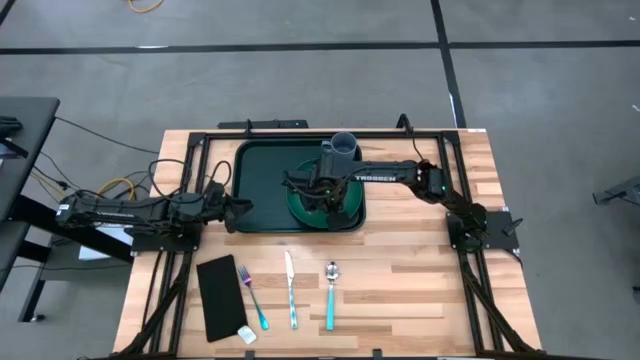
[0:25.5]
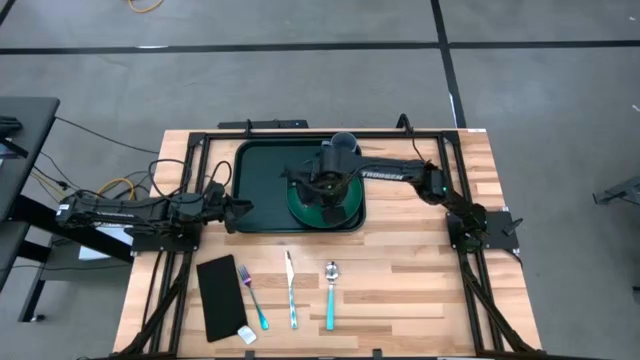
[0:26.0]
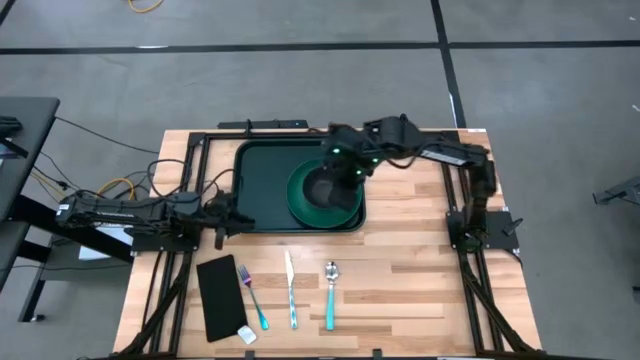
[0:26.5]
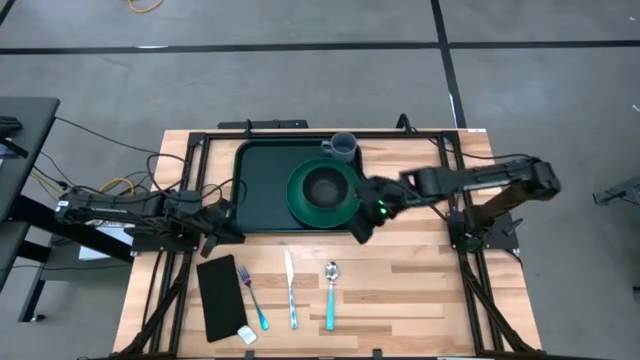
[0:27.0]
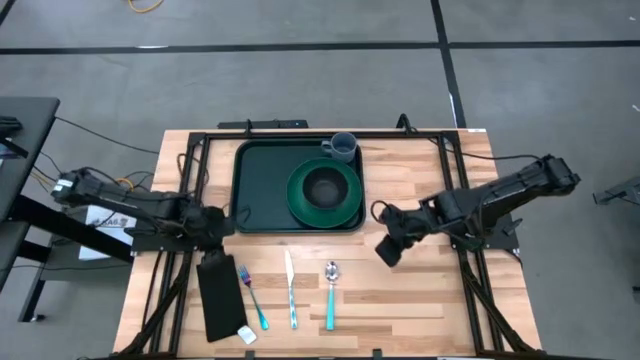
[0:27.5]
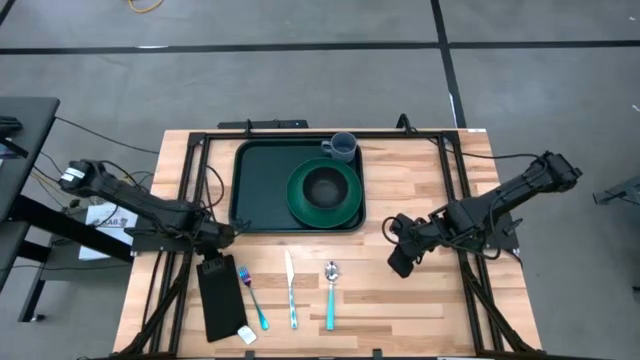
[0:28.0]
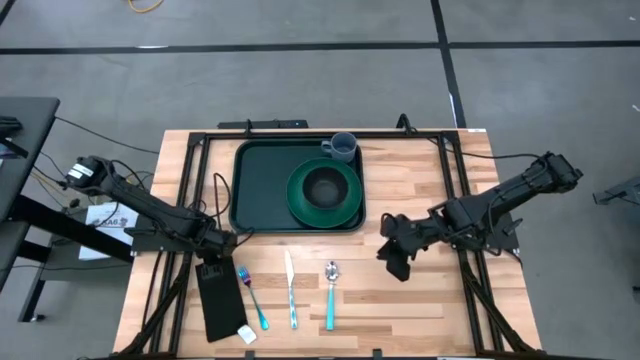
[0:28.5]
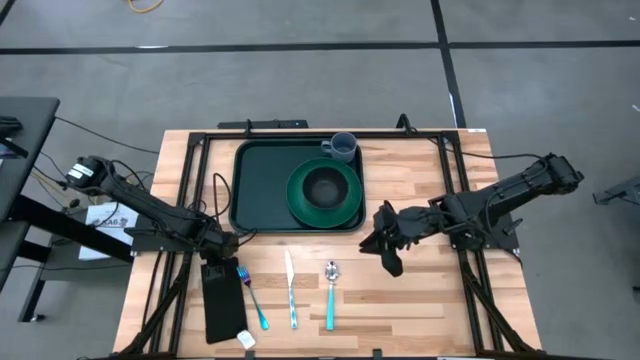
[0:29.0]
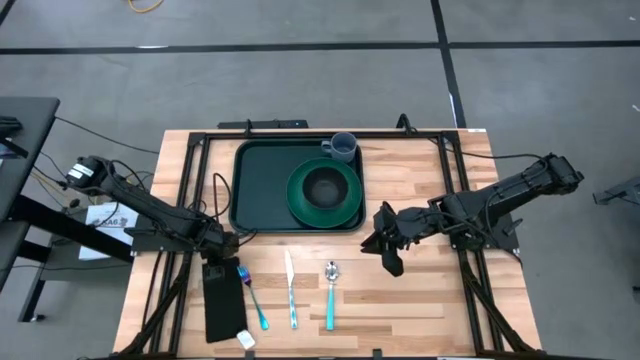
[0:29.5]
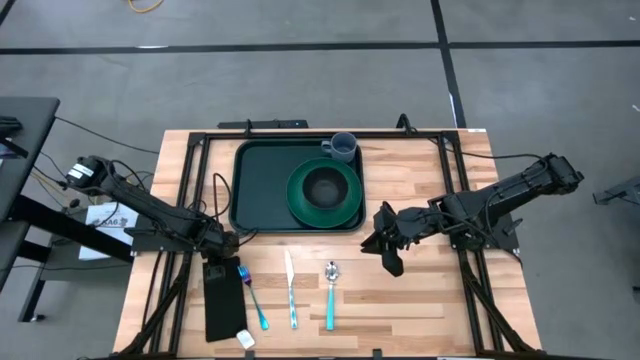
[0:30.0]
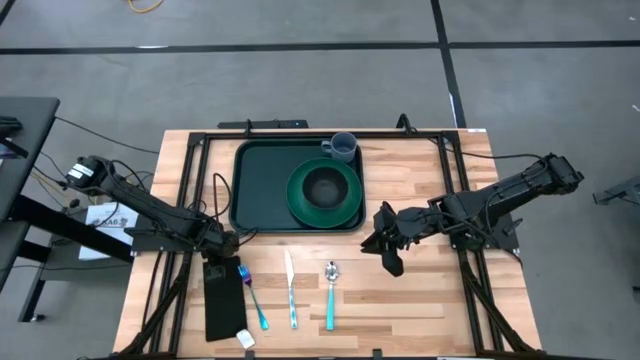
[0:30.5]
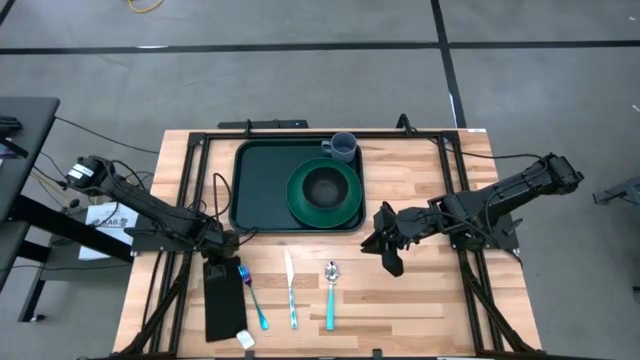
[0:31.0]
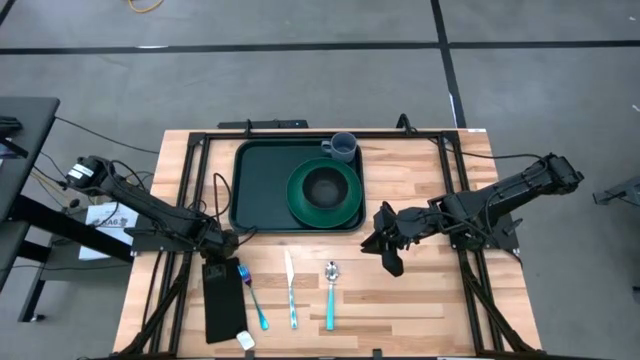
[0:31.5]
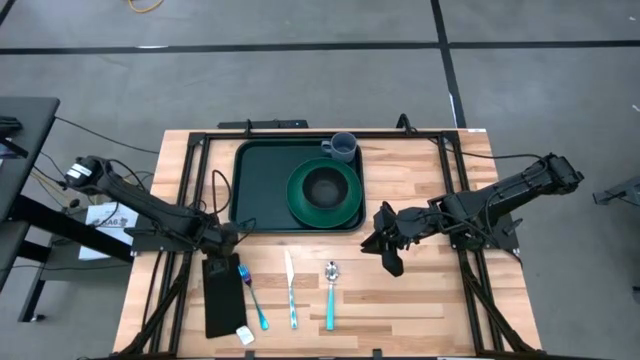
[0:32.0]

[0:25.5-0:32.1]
Task: Set up tray
Put the black napkin on the black serving tray to the left of the green plate

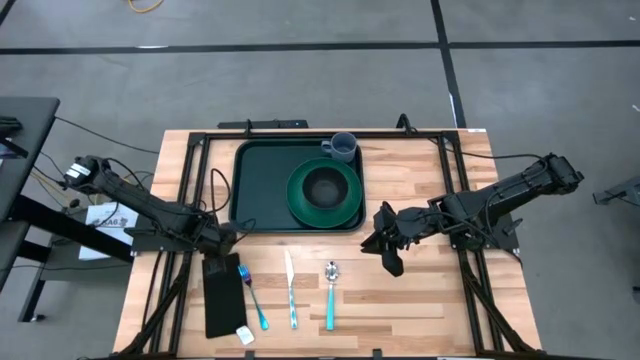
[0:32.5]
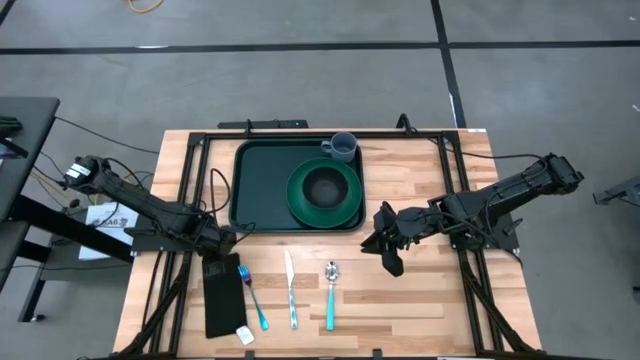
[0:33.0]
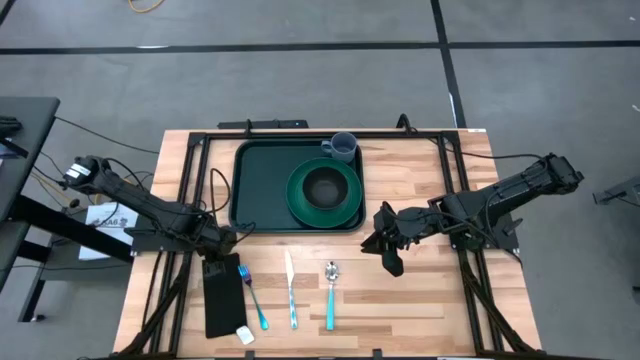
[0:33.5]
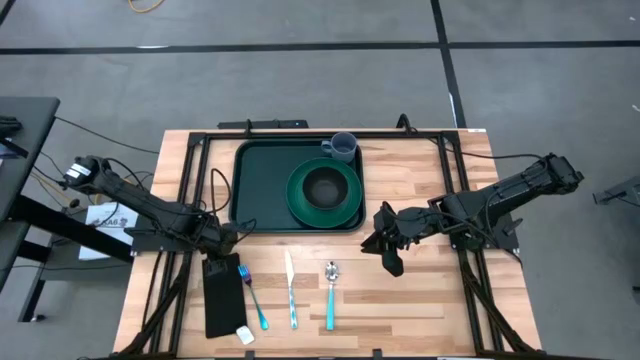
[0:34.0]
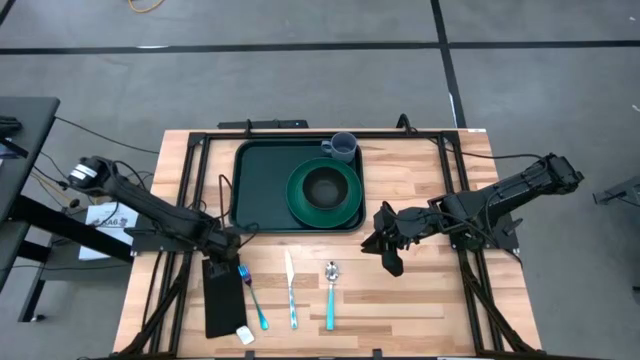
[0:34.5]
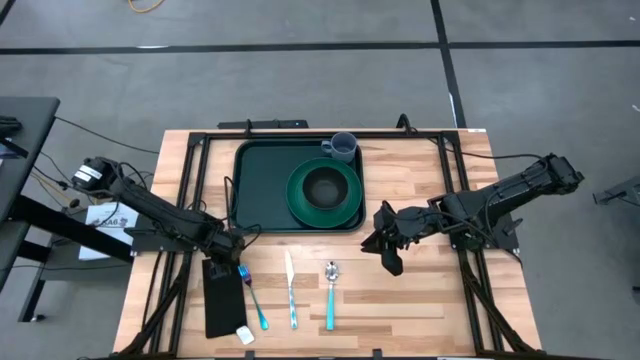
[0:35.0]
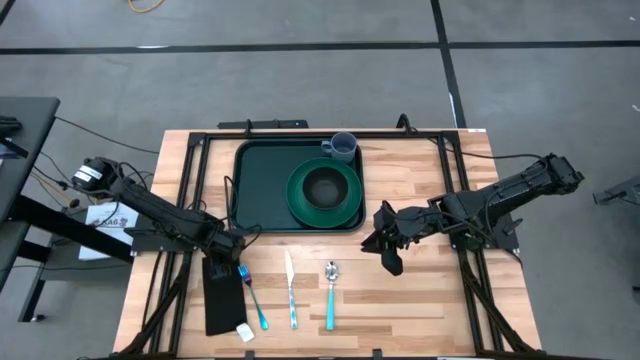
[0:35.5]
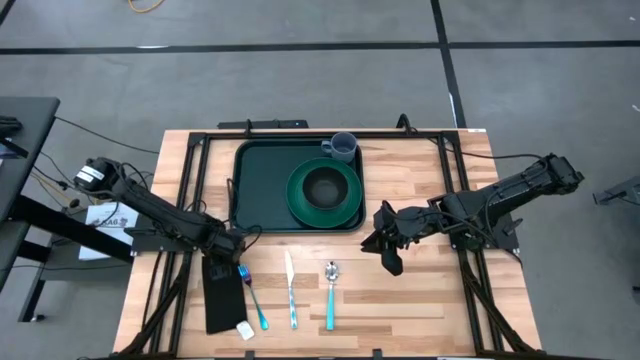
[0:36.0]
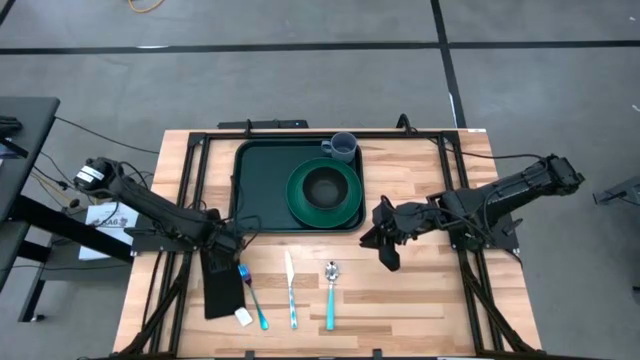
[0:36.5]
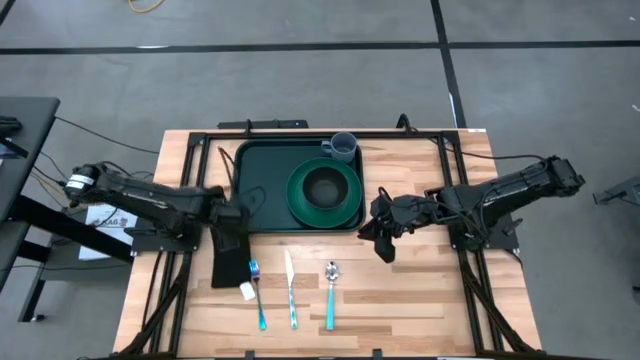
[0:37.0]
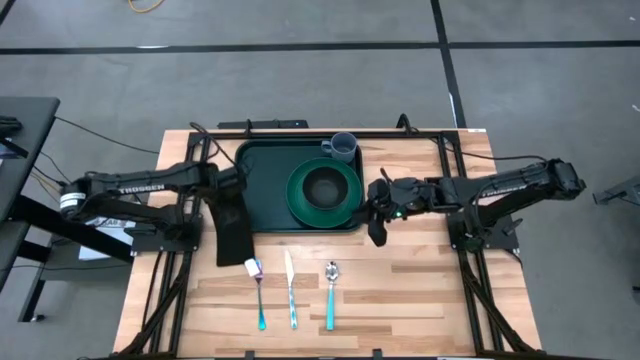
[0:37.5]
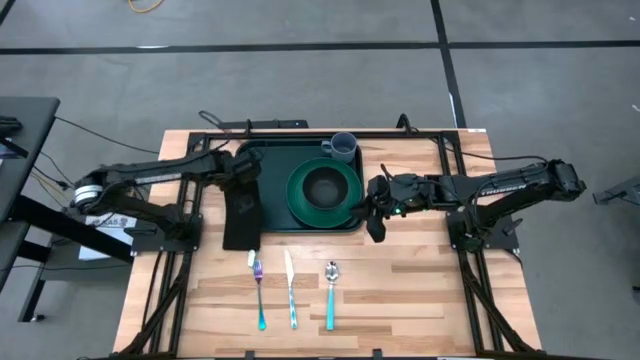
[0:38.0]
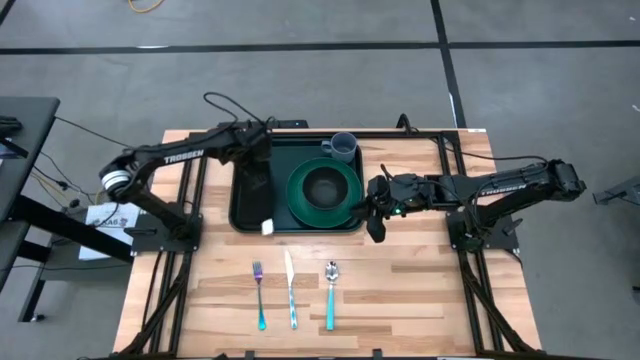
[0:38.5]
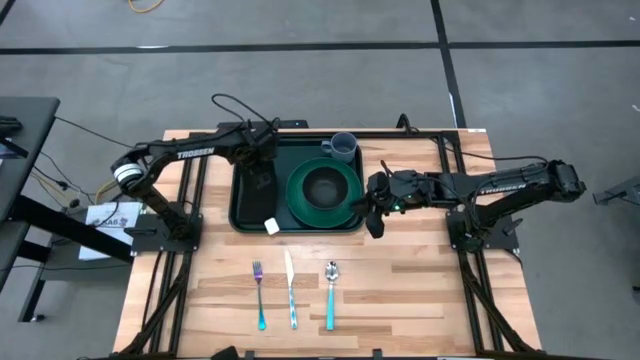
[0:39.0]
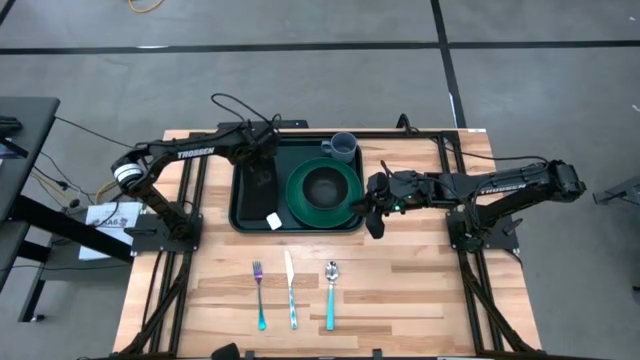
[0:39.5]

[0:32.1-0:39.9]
Put the black napkin on the black serving tray to the left of the green plate

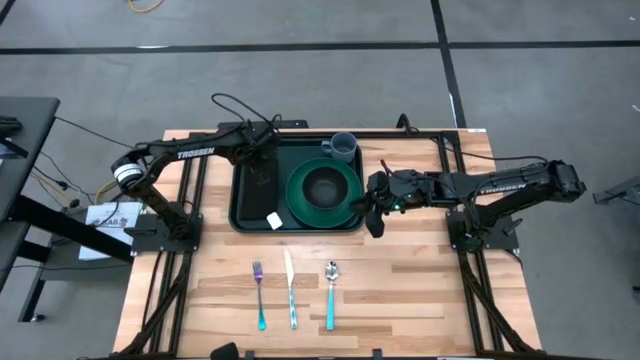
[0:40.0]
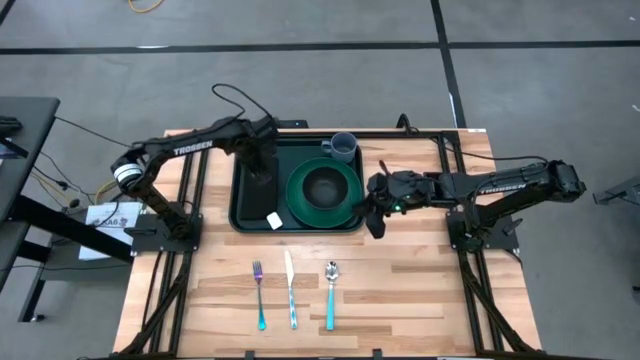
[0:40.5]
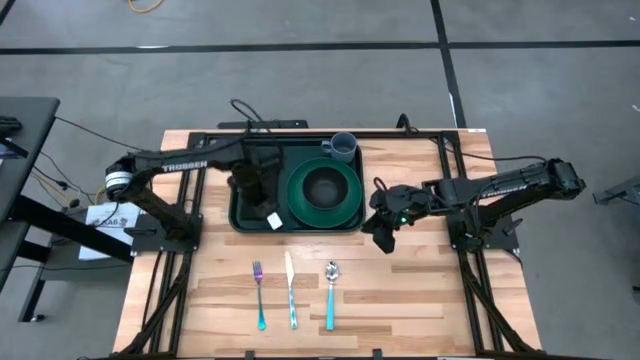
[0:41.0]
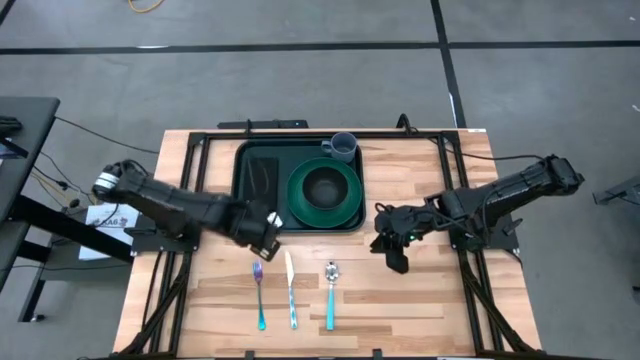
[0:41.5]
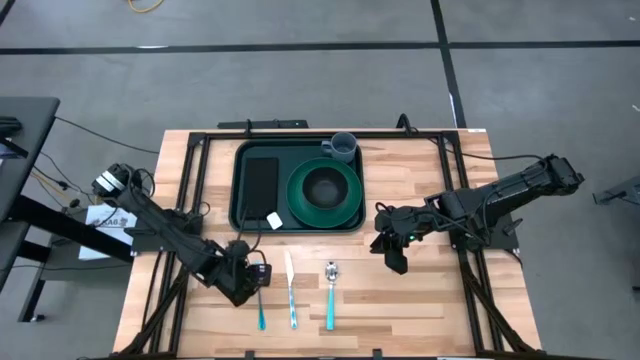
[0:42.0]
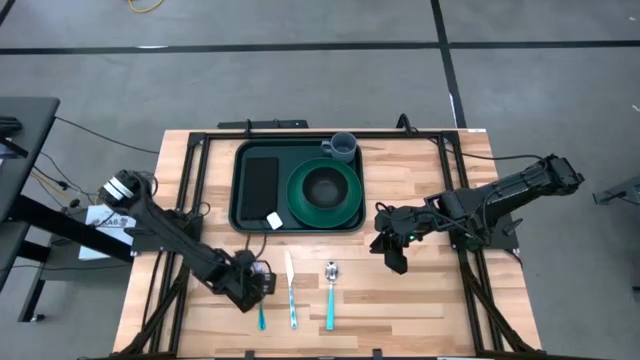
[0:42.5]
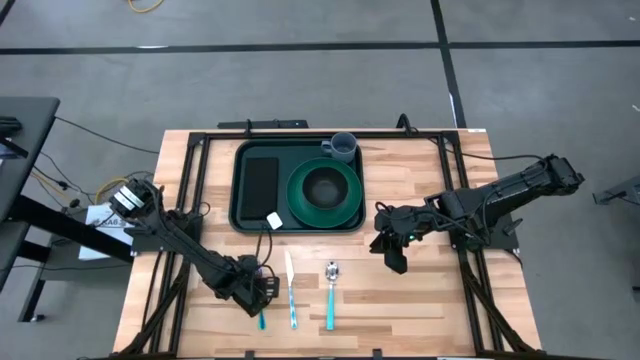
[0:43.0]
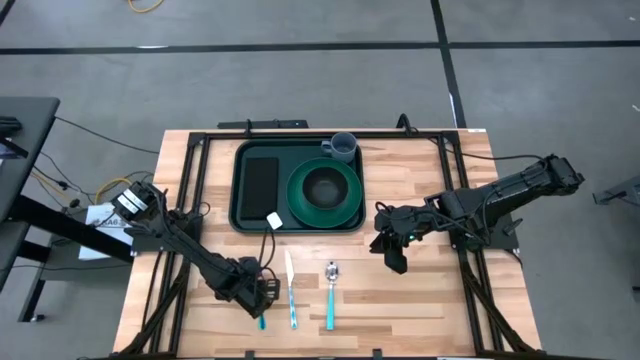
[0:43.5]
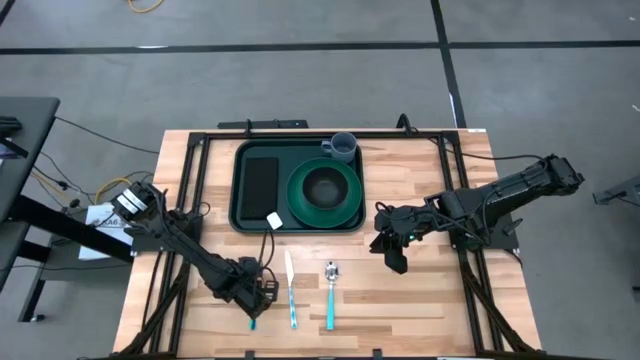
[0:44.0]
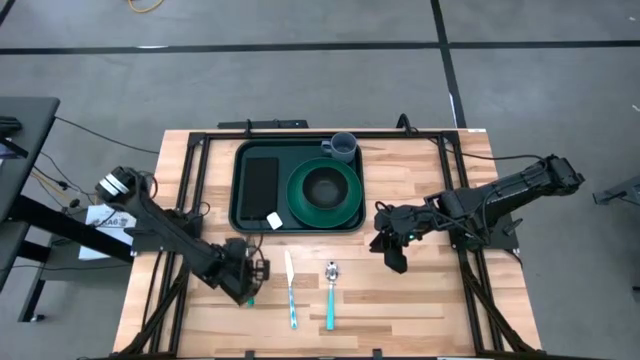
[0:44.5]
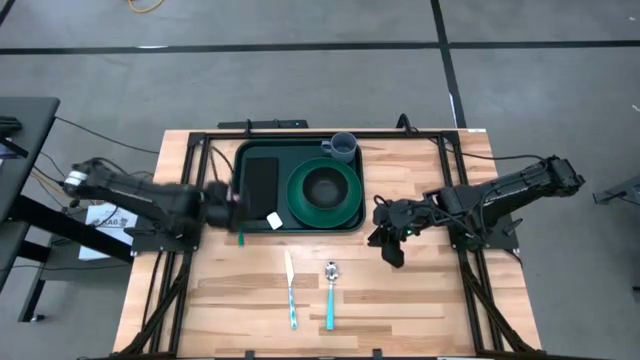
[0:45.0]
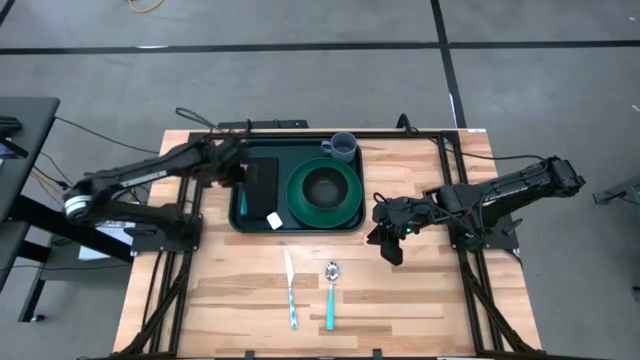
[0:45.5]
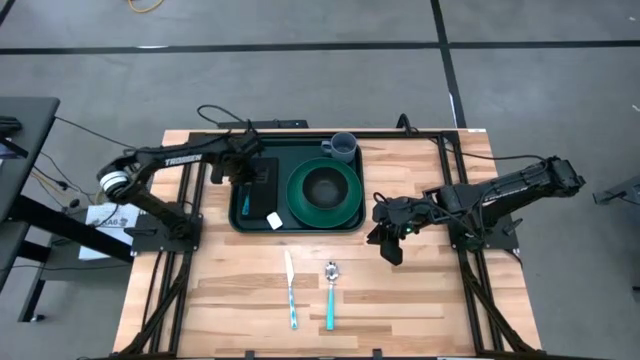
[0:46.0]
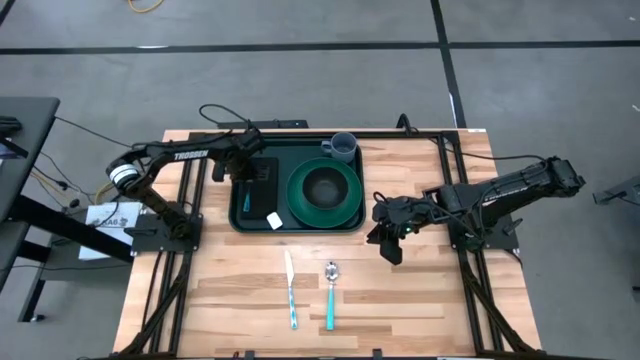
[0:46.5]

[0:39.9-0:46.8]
Put the purple fork on the black napkin on the black serving tray
